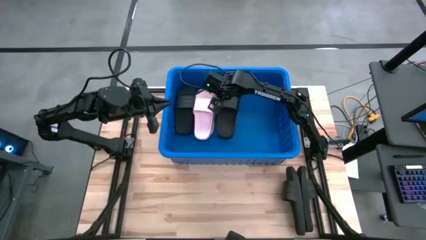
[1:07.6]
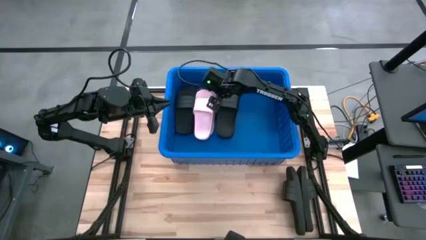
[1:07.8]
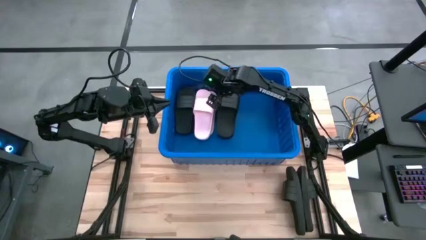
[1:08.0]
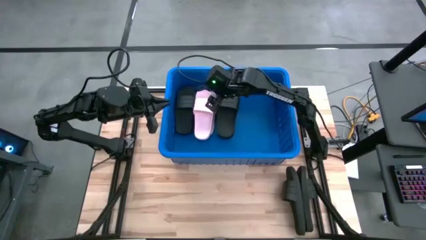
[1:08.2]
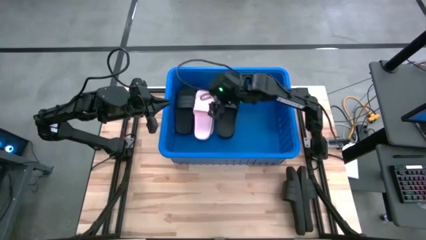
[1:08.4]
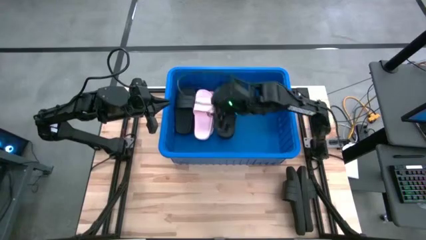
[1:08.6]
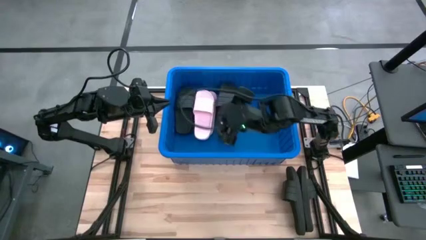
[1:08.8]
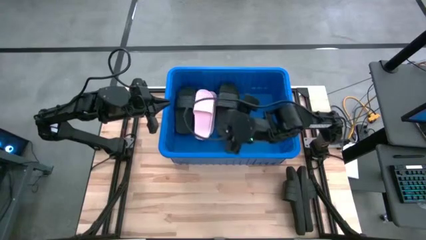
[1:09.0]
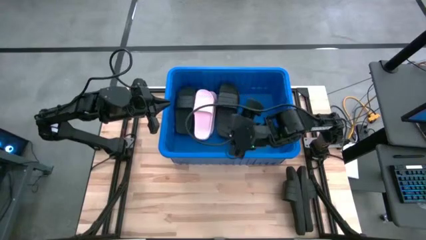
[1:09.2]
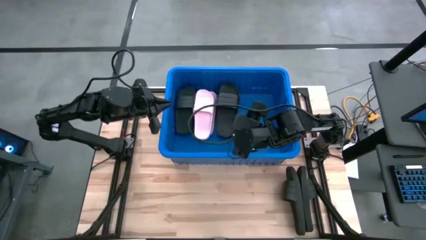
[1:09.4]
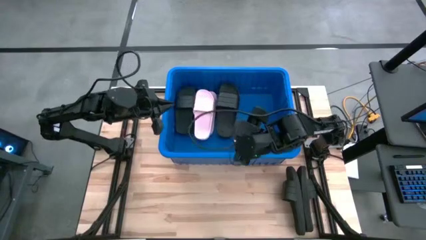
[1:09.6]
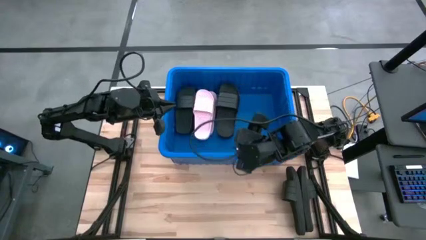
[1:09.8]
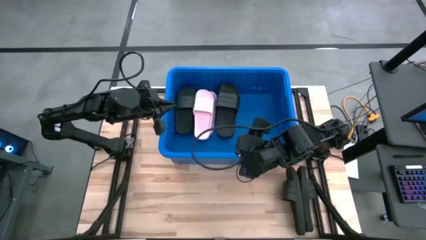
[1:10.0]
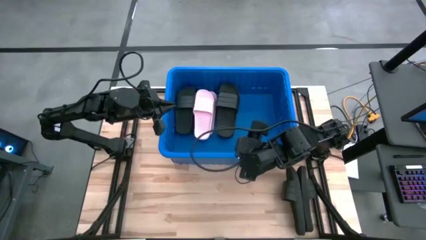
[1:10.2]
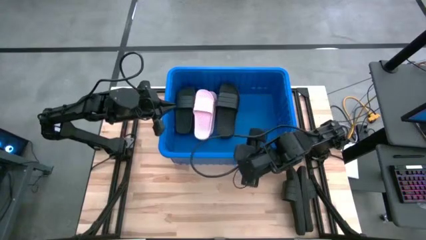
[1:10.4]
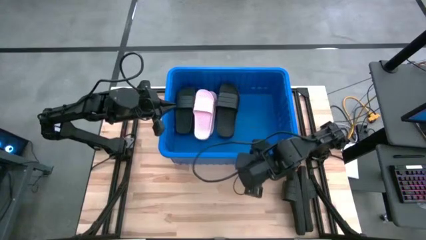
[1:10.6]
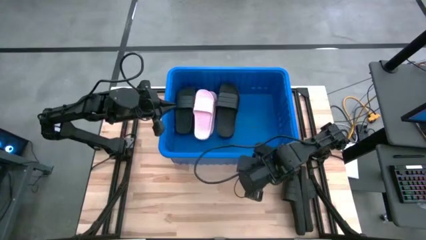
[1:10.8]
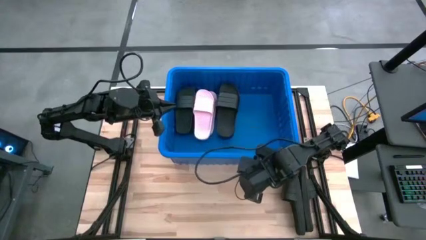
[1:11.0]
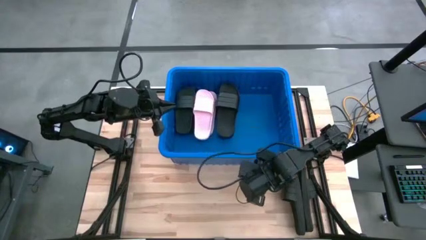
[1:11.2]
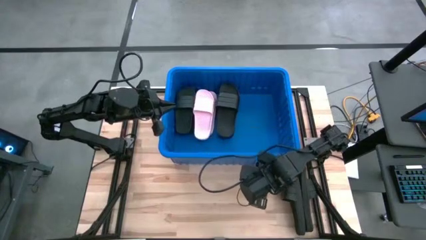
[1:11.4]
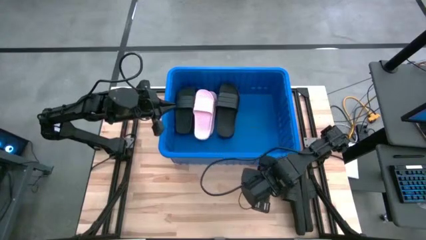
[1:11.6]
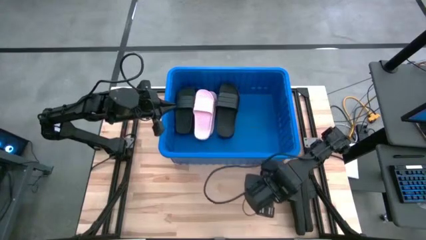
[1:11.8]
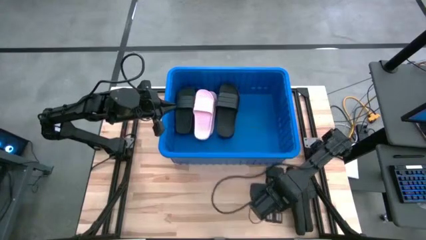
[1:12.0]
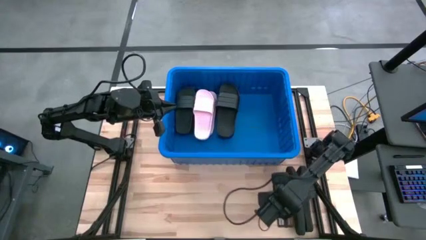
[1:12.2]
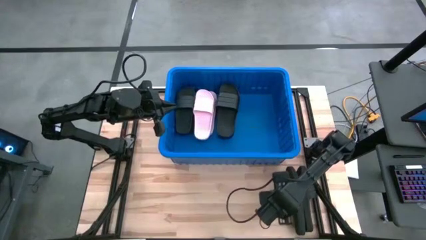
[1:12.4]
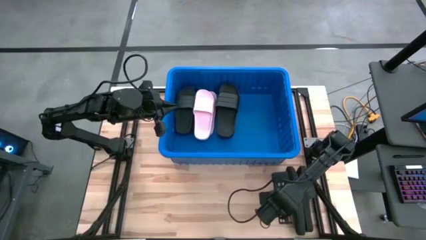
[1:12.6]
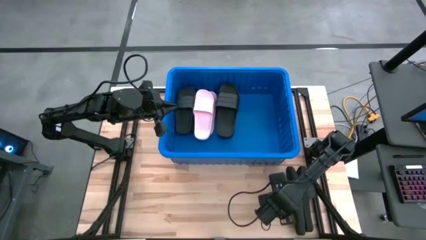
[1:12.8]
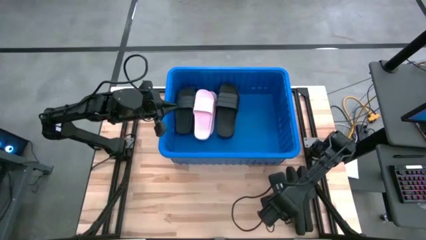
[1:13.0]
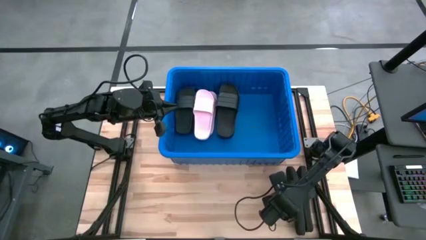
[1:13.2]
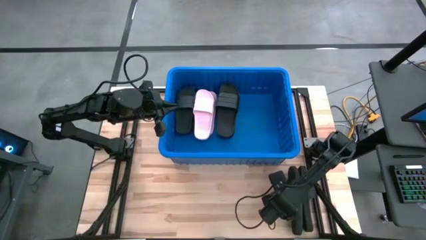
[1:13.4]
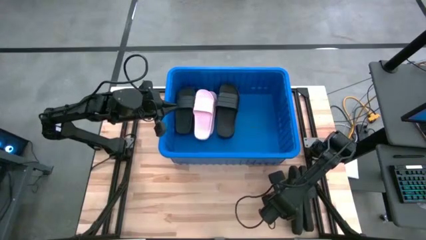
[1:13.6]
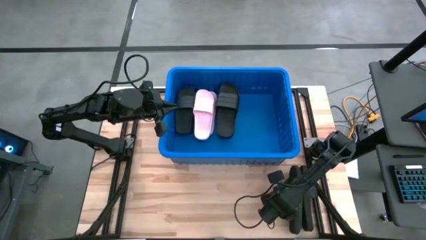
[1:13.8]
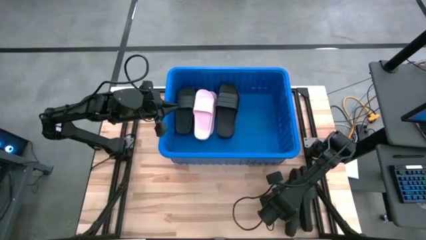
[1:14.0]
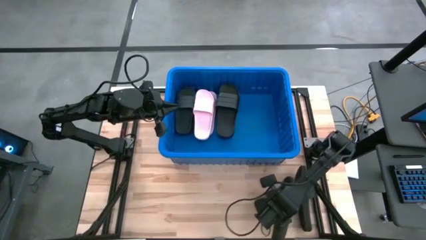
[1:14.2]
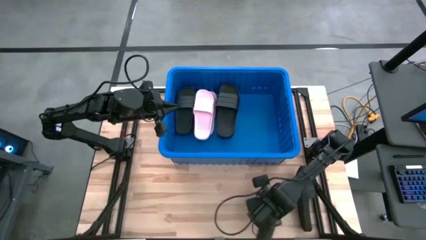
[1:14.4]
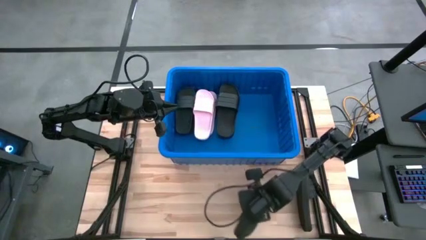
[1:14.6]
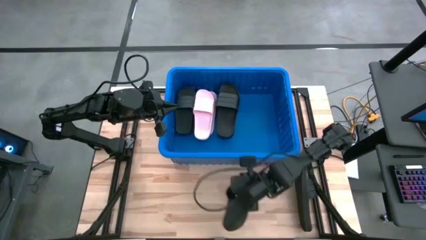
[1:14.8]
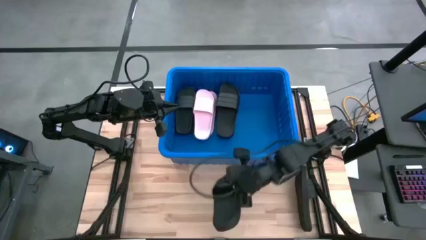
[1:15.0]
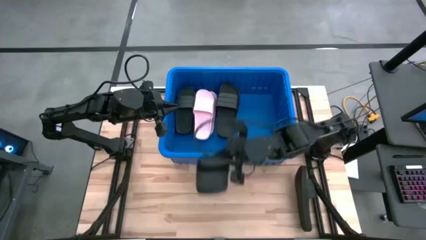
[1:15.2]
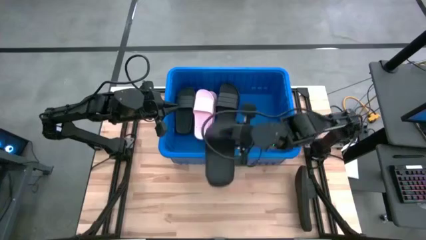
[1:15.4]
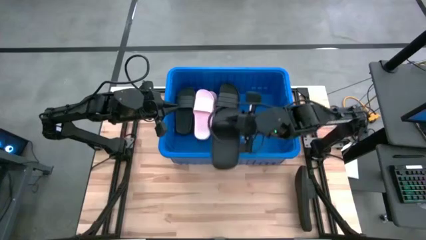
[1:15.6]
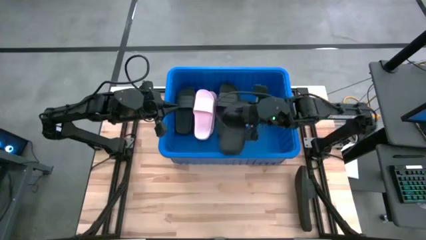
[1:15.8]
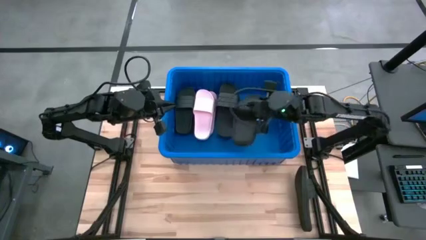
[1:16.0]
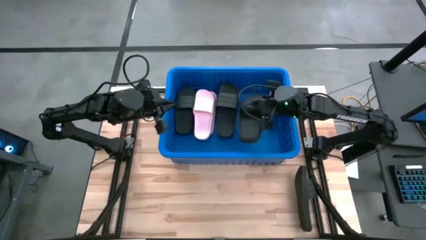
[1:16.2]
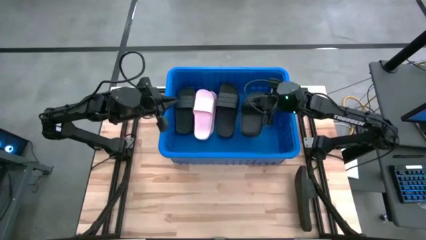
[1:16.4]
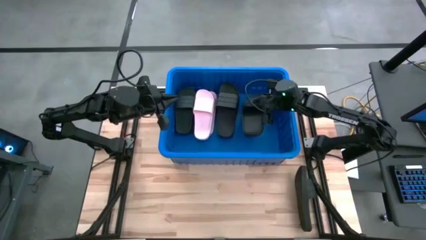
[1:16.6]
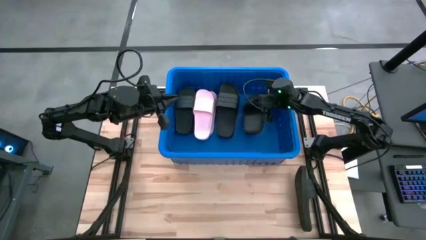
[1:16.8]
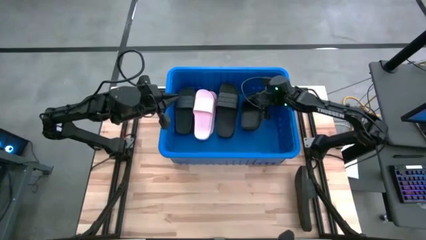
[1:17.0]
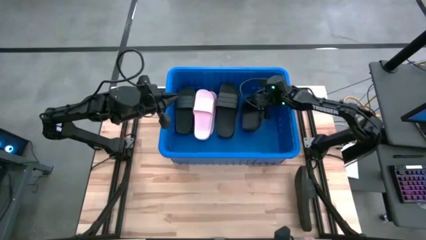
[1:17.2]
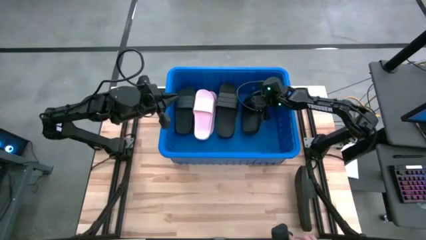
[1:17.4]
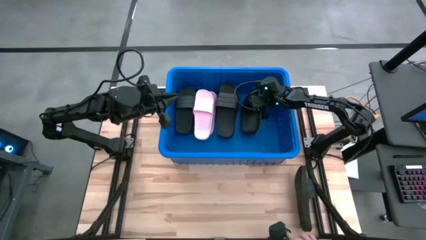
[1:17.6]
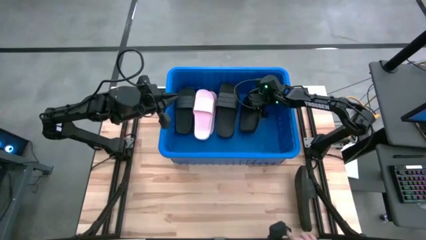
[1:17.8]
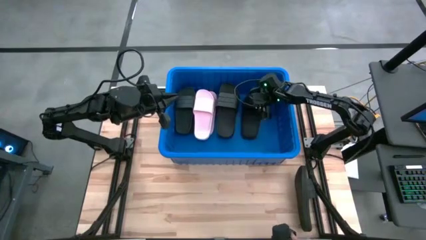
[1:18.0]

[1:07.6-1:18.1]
Task: Pick and place slides into bin
Put the black slide into the blue container
